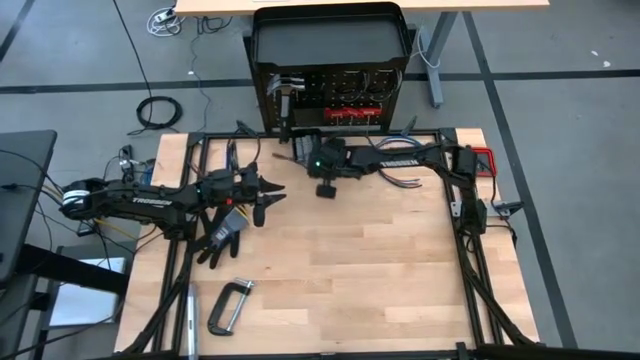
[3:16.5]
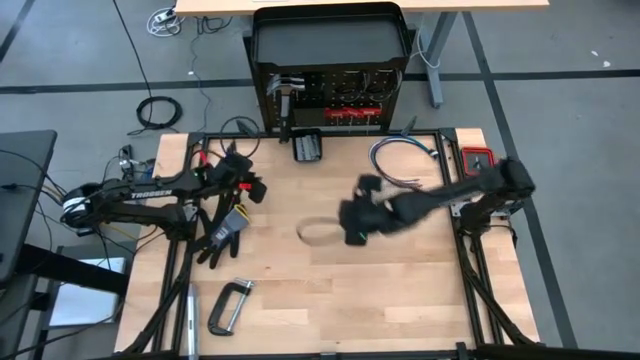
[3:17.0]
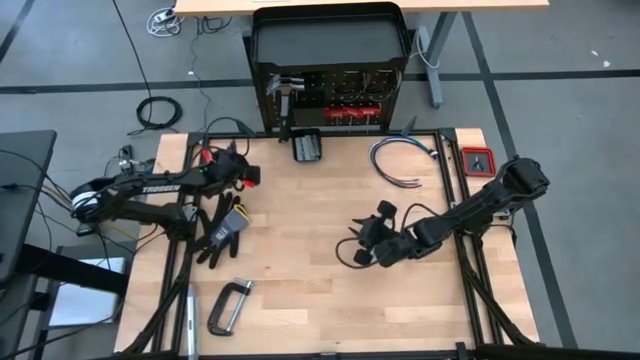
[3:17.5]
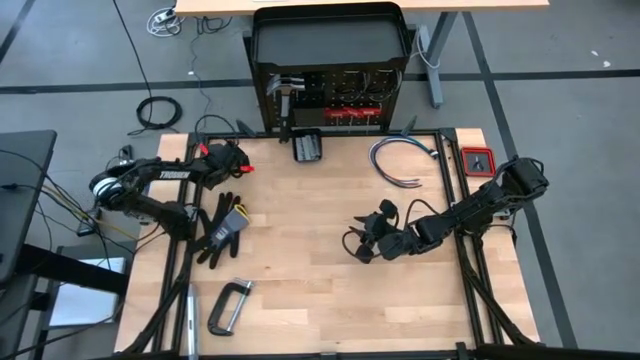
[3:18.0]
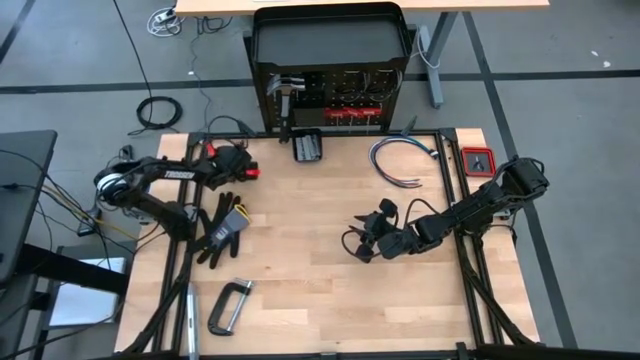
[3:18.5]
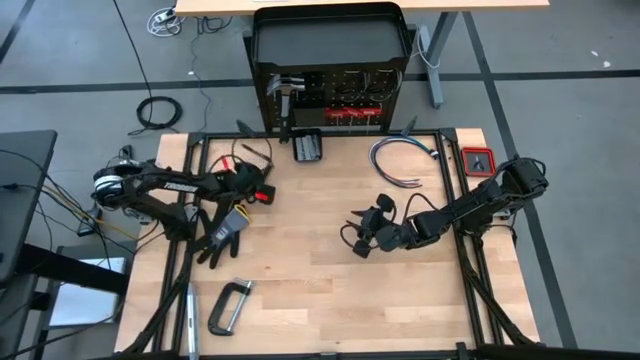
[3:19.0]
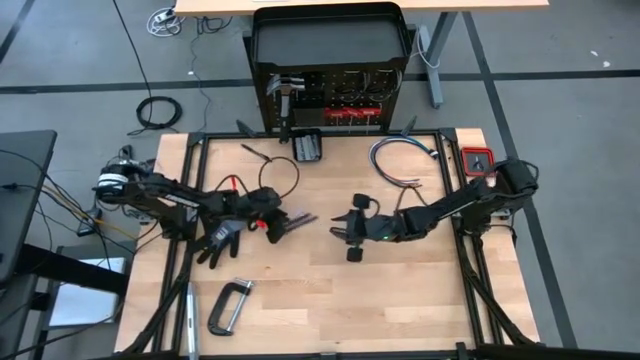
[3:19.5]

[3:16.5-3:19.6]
Task: Hang tools onto peg board
Move the pens to the center of the table

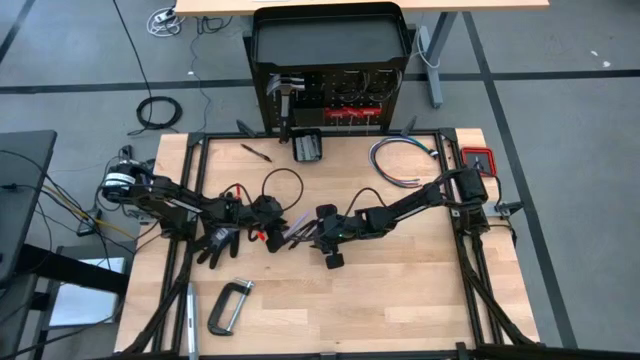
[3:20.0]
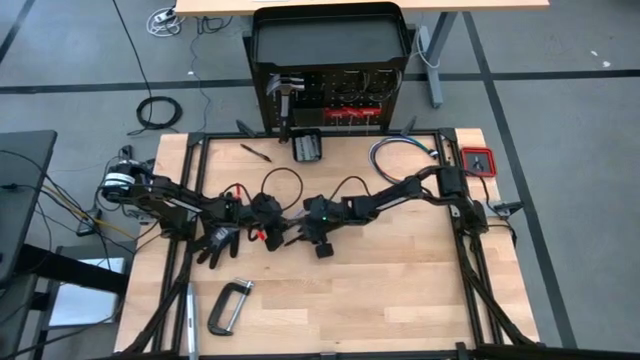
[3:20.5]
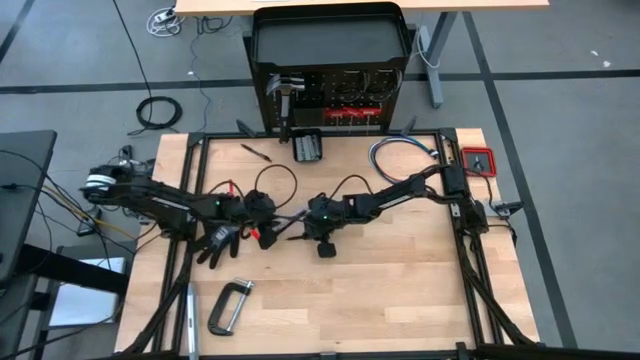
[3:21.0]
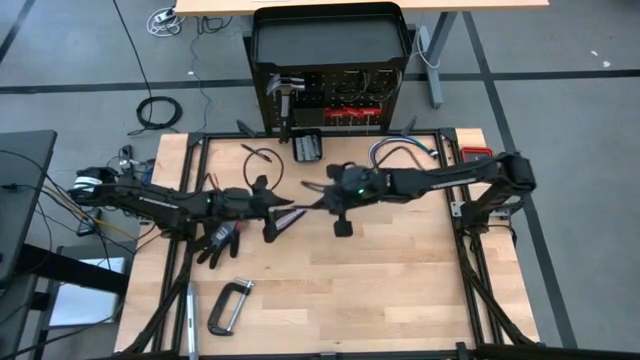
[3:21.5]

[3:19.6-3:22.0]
Put the black pen on the peg board

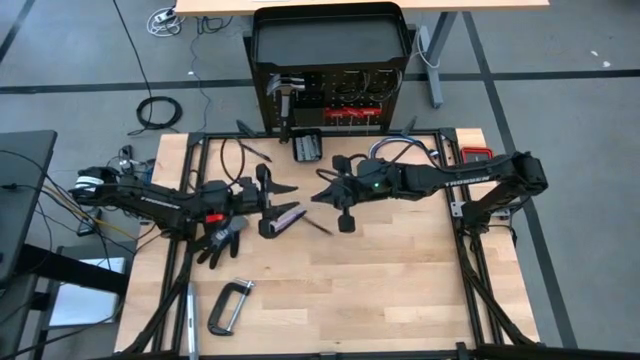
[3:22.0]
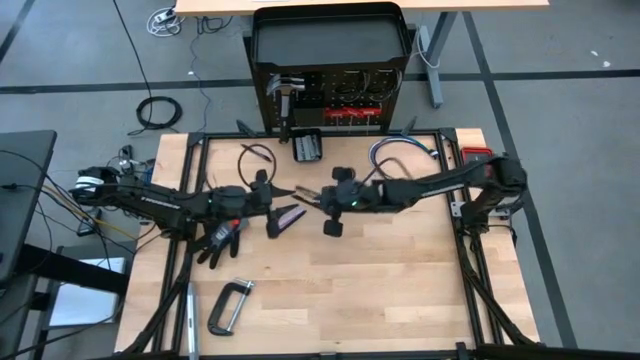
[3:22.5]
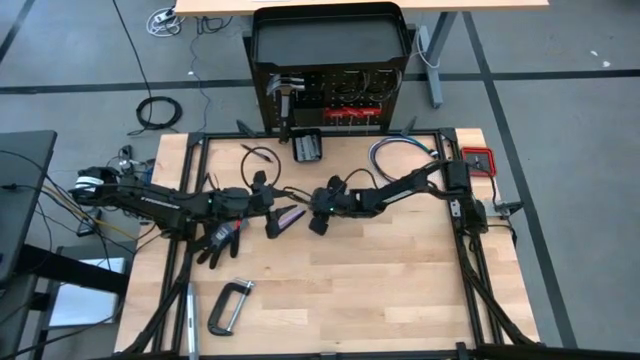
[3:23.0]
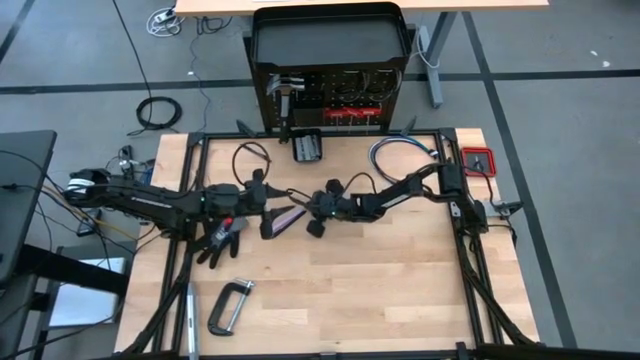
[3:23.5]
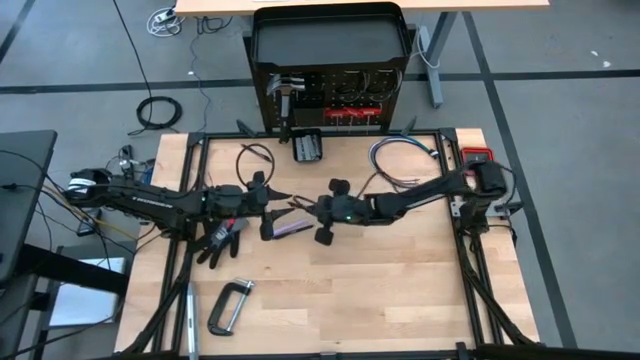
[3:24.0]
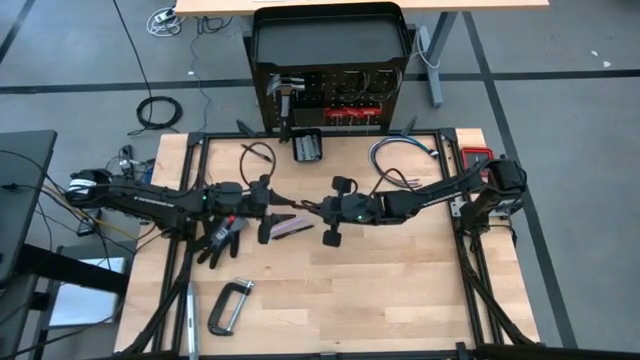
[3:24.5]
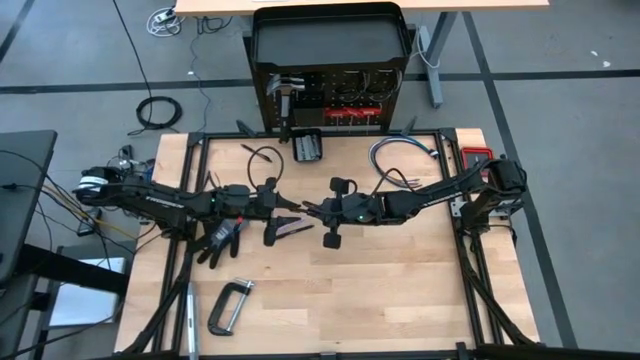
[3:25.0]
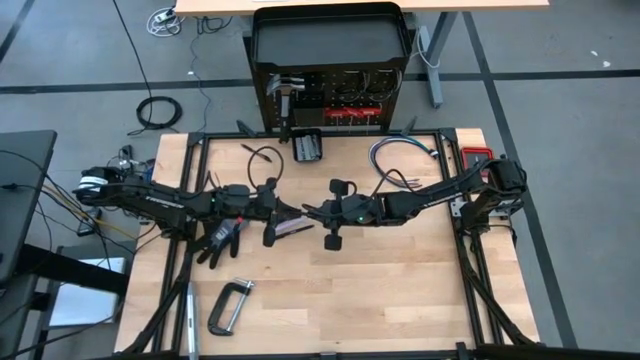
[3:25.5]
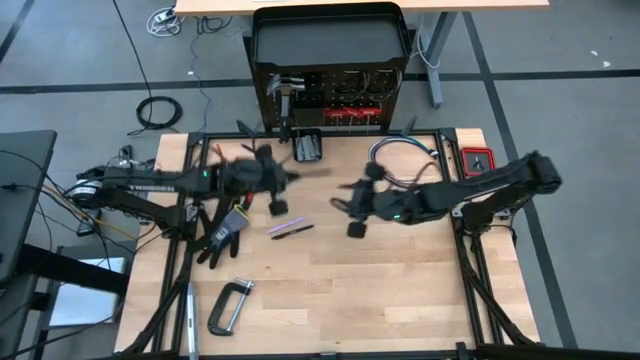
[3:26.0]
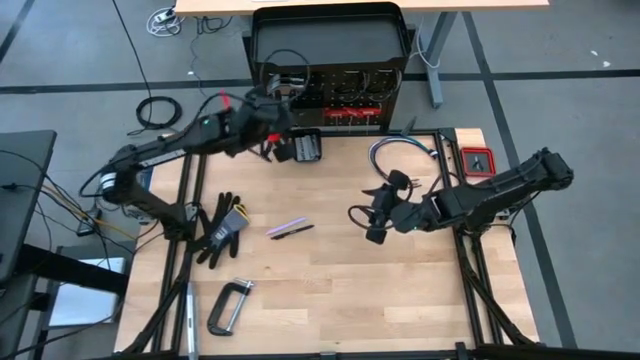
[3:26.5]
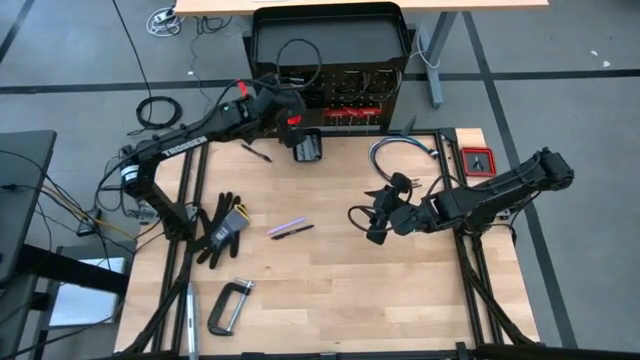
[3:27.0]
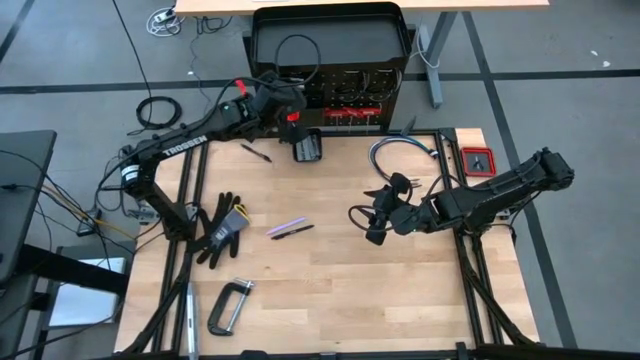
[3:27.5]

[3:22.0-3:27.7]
Put the black pen on the peg board

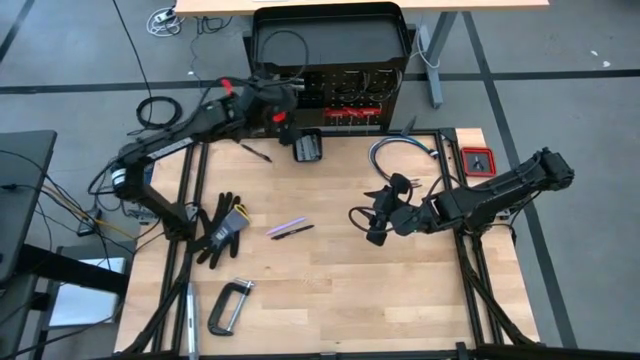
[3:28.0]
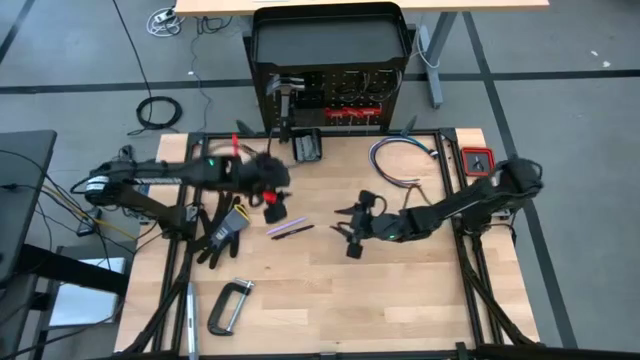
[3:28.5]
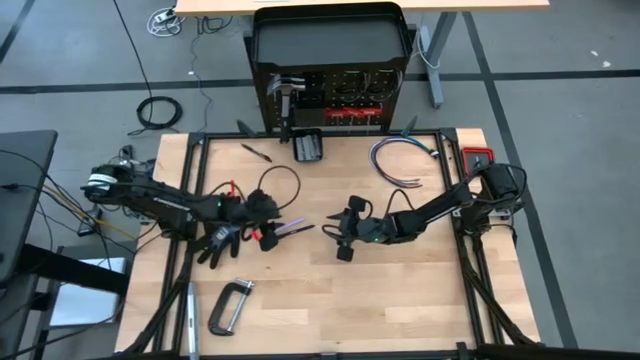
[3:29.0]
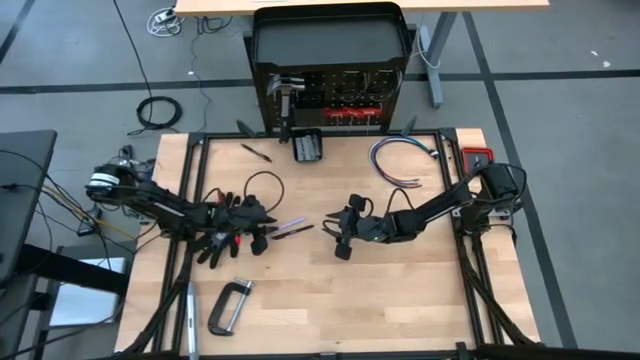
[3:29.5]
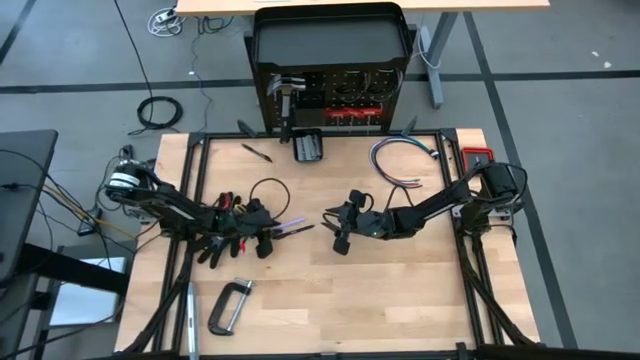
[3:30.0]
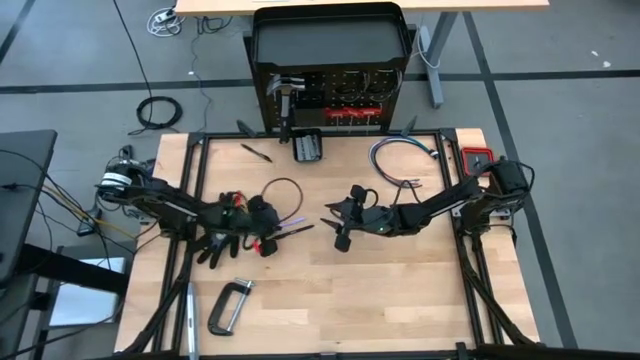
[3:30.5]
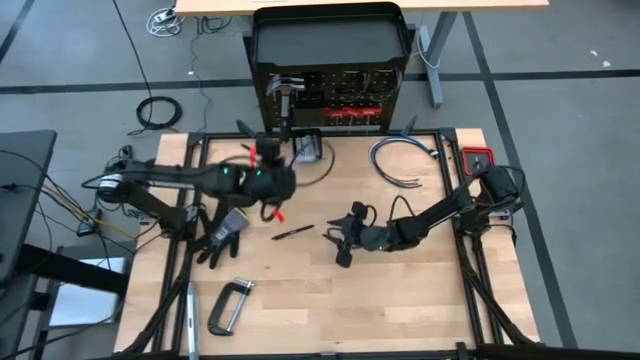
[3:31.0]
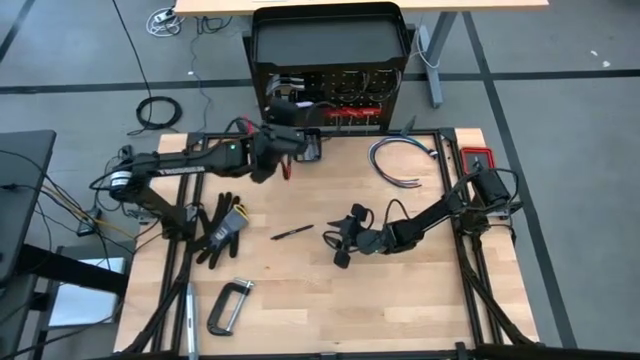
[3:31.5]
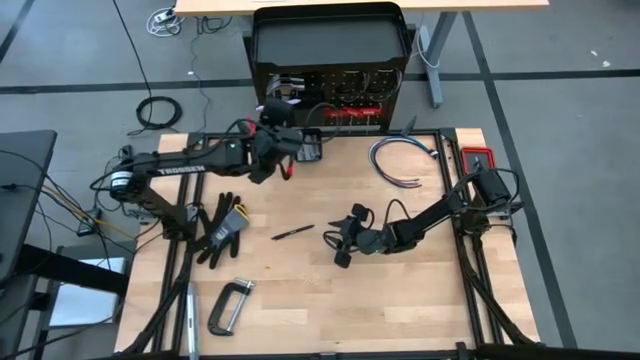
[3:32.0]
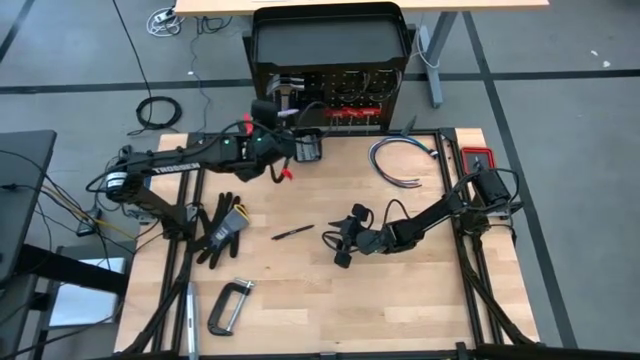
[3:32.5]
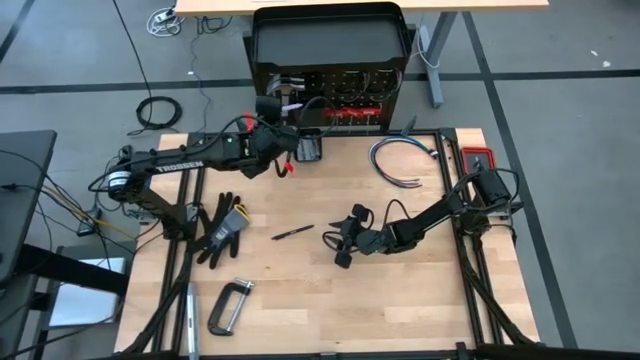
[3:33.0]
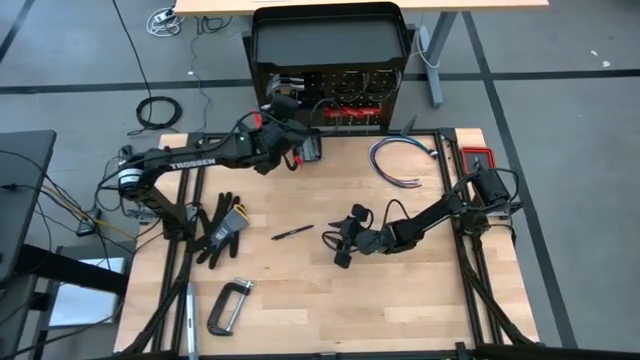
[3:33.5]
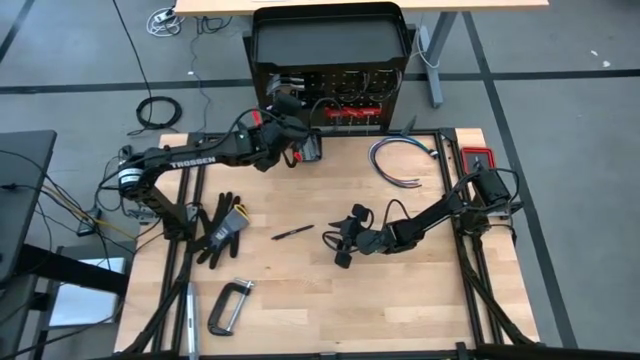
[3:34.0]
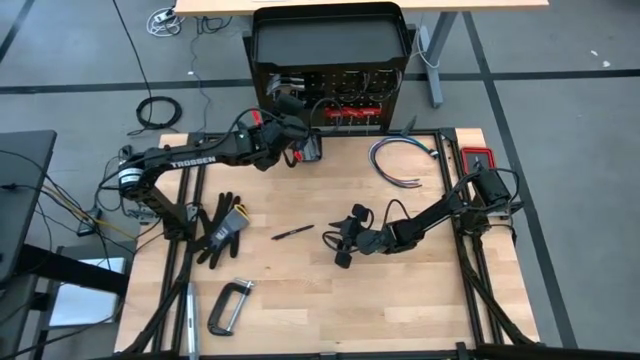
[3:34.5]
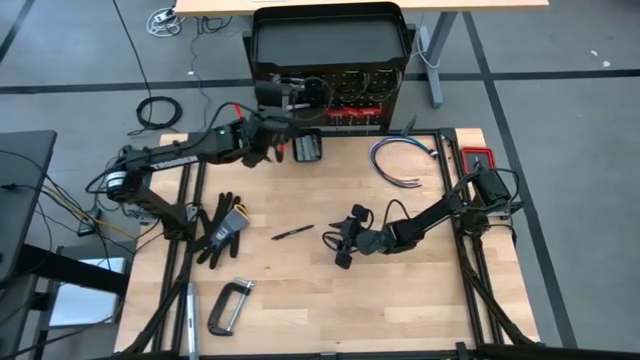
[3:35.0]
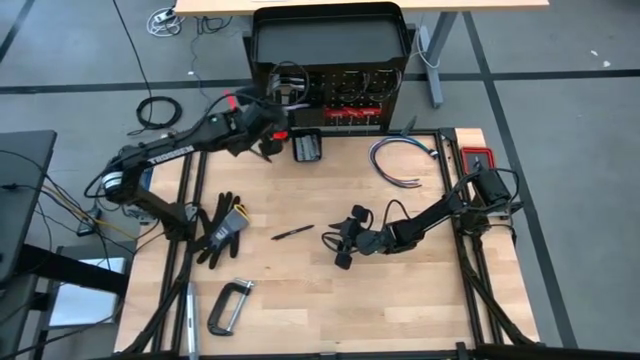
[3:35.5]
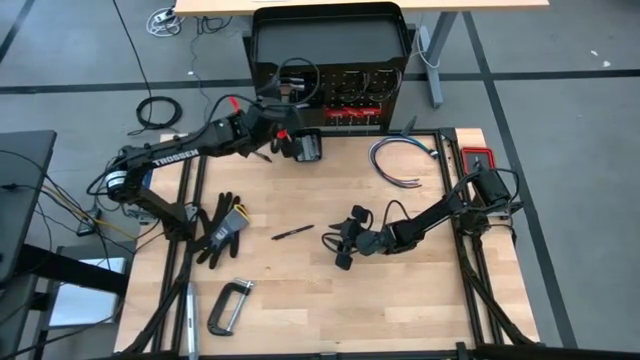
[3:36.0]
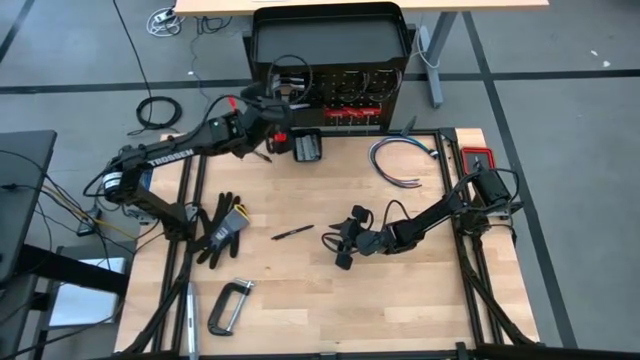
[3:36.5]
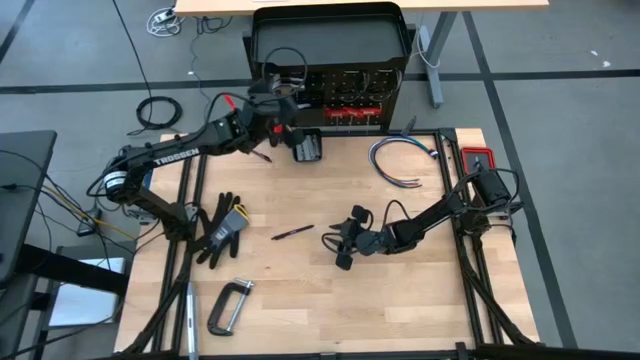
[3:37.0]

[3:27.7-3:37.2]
Put the pink pen on the peg board
